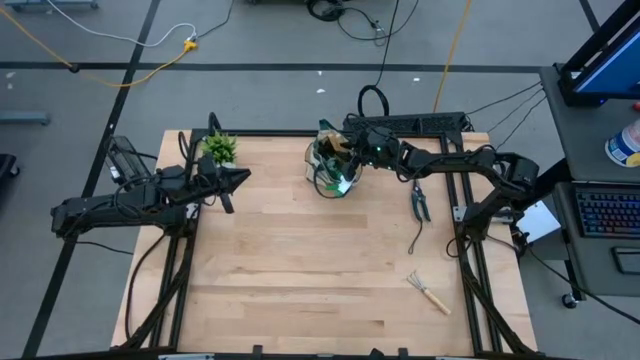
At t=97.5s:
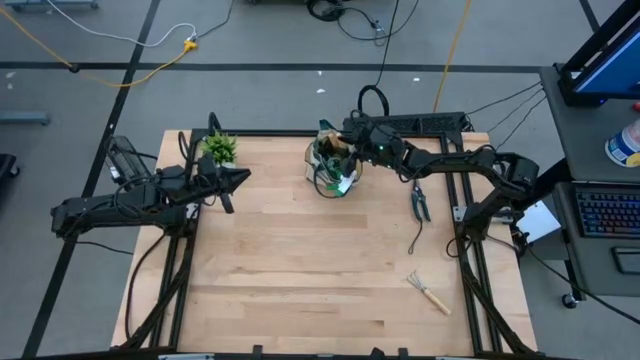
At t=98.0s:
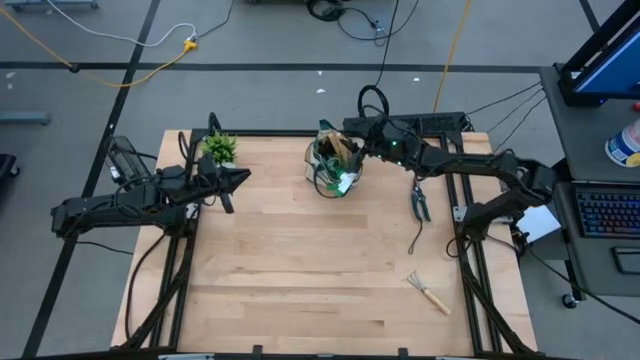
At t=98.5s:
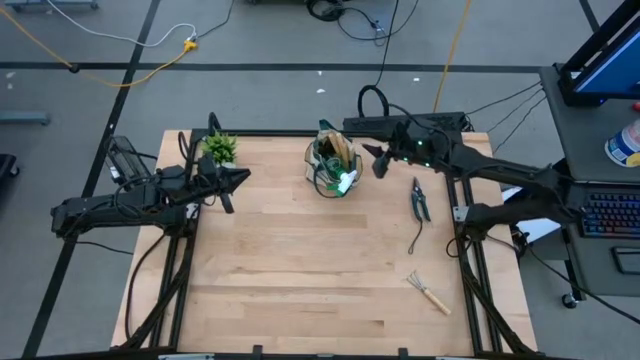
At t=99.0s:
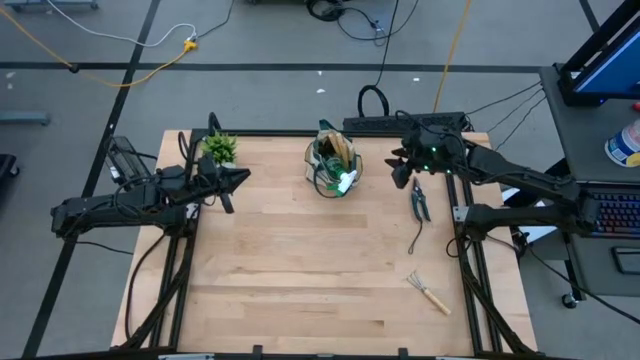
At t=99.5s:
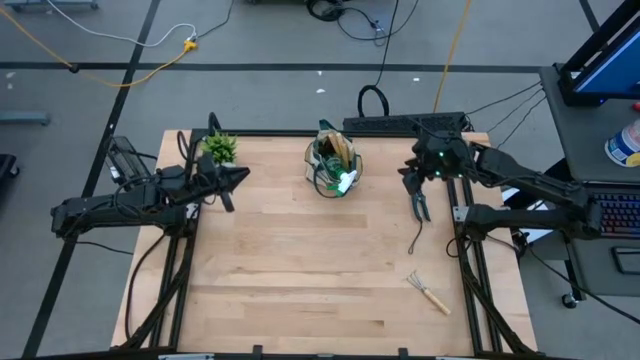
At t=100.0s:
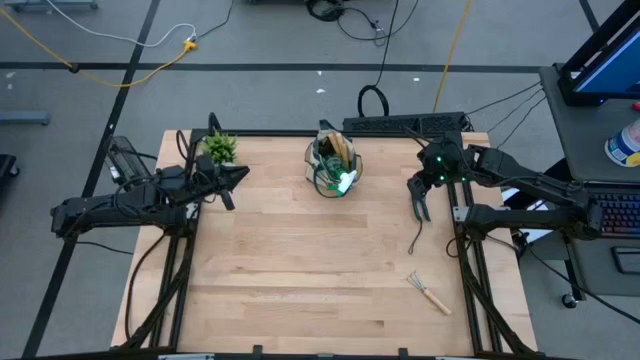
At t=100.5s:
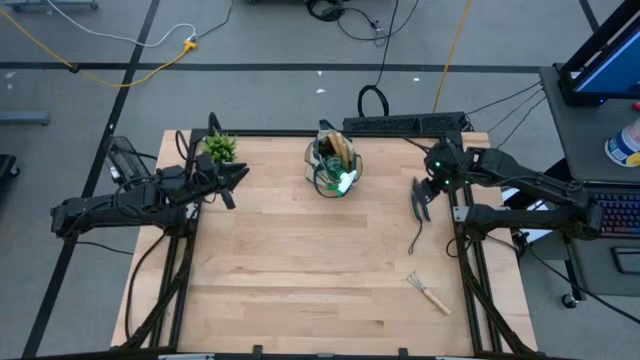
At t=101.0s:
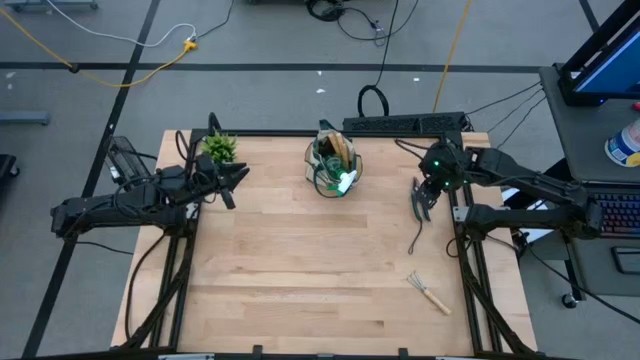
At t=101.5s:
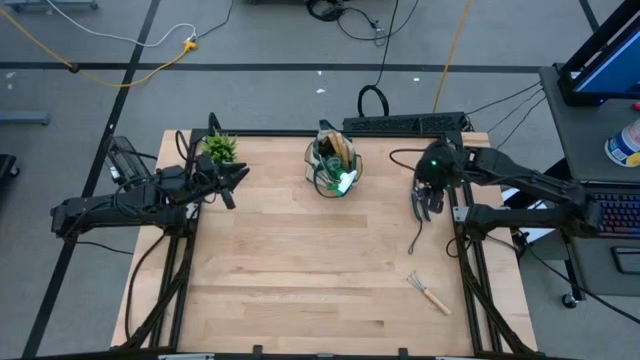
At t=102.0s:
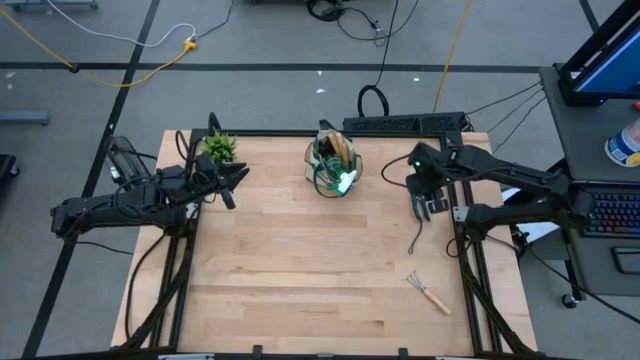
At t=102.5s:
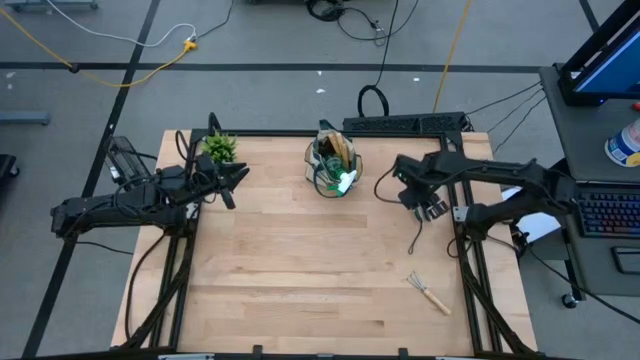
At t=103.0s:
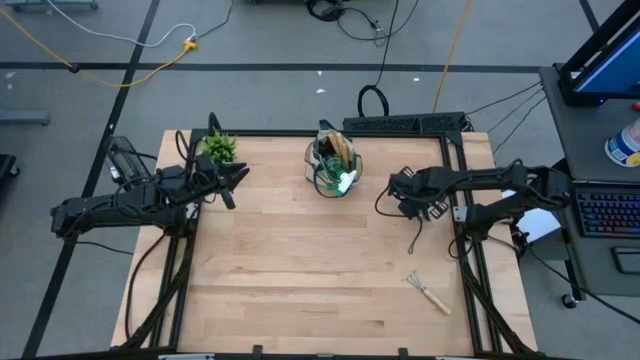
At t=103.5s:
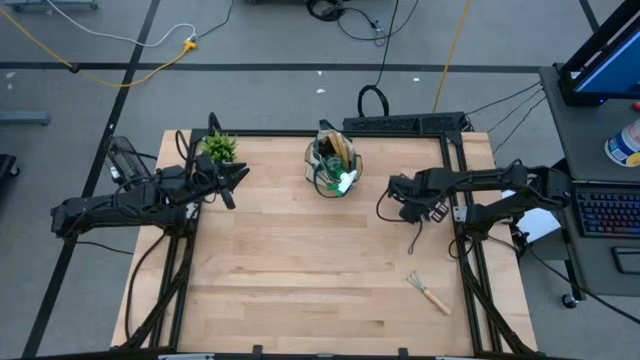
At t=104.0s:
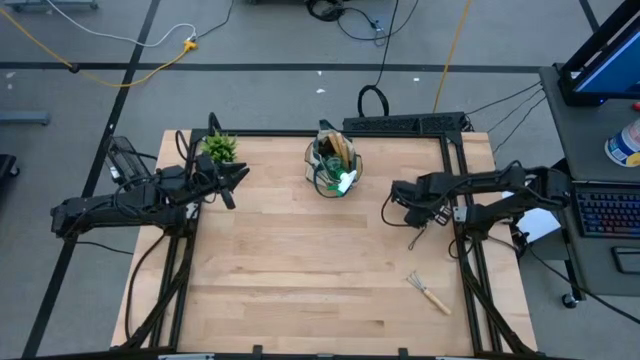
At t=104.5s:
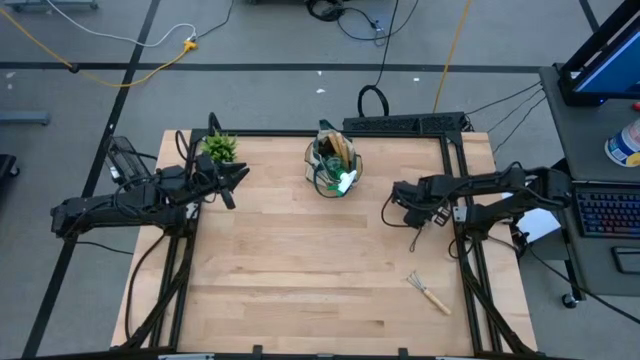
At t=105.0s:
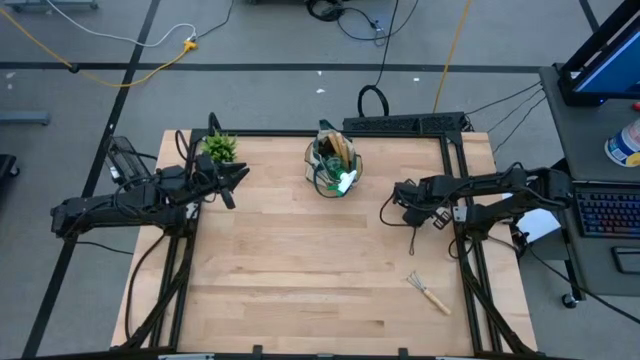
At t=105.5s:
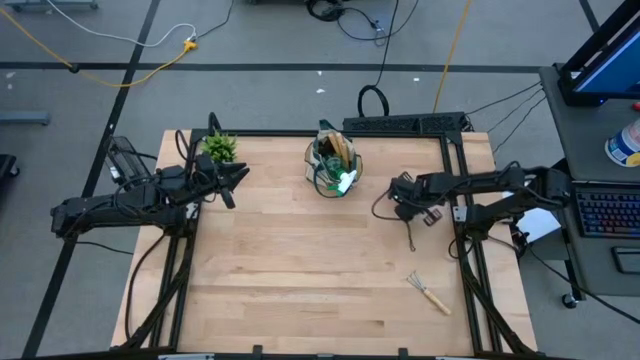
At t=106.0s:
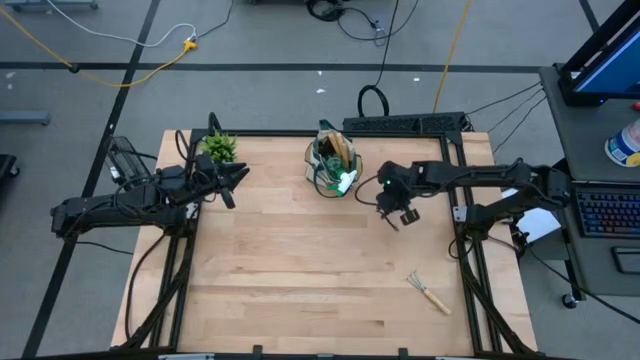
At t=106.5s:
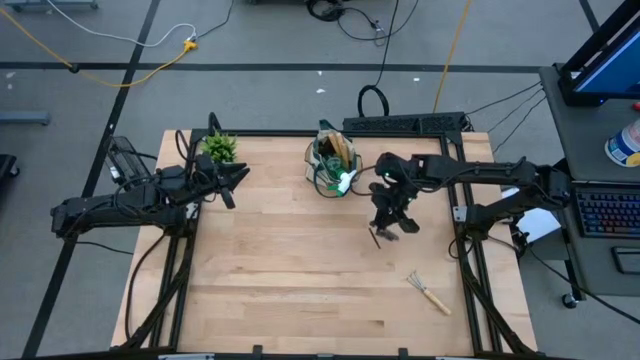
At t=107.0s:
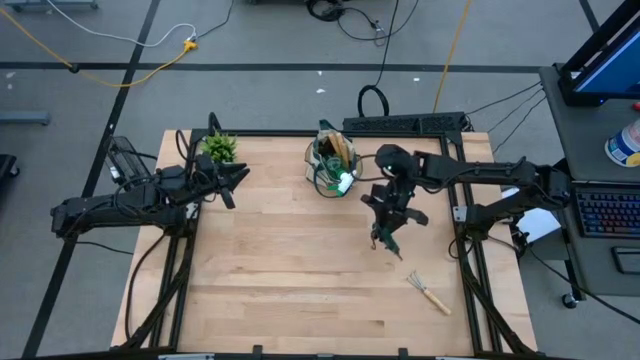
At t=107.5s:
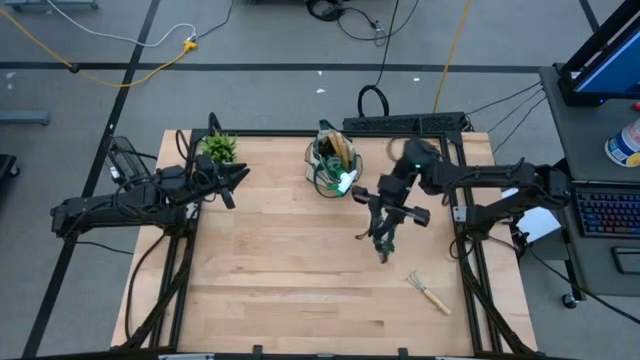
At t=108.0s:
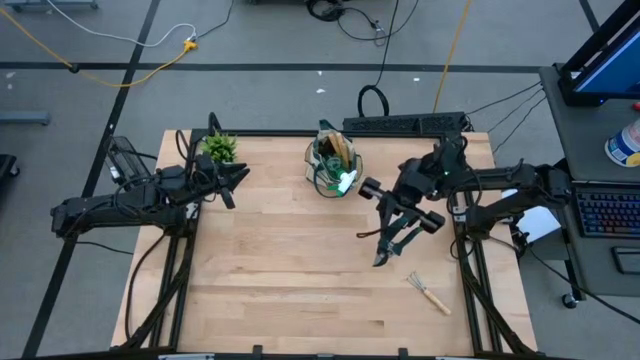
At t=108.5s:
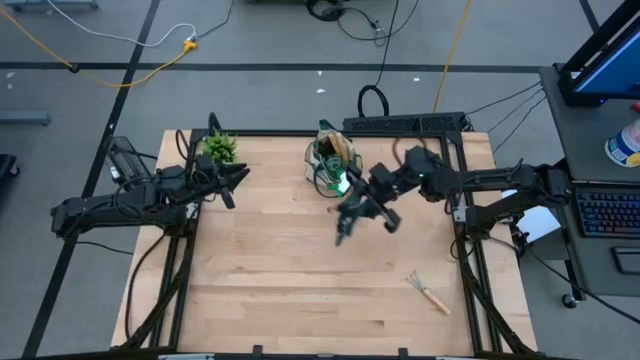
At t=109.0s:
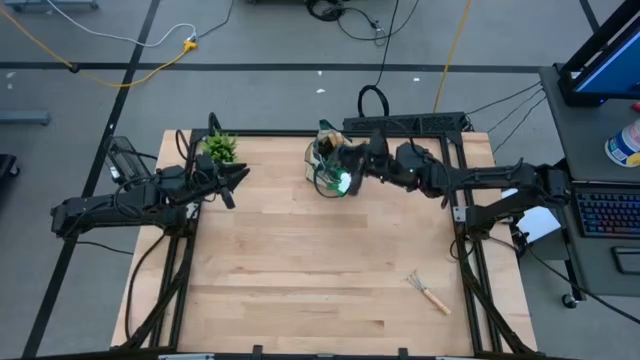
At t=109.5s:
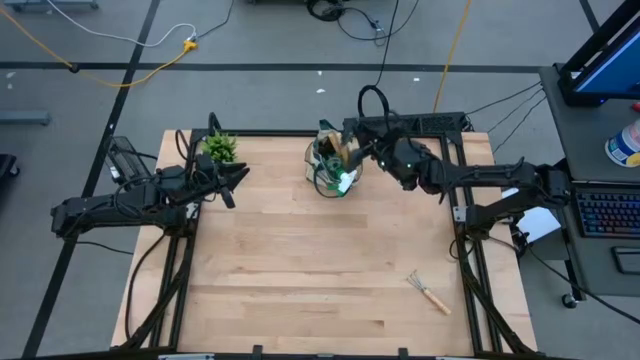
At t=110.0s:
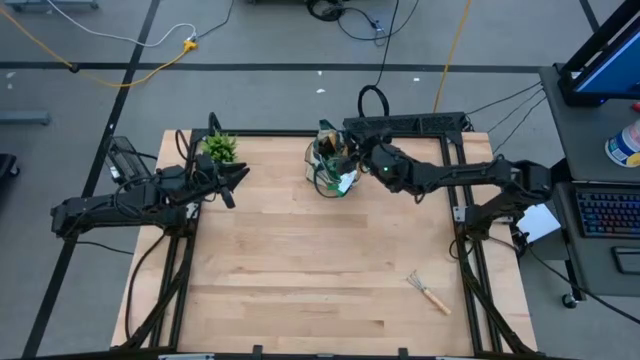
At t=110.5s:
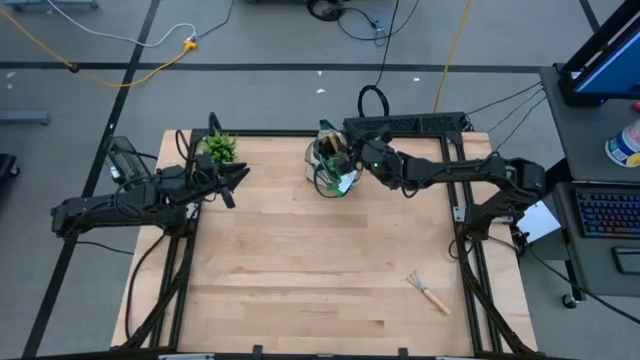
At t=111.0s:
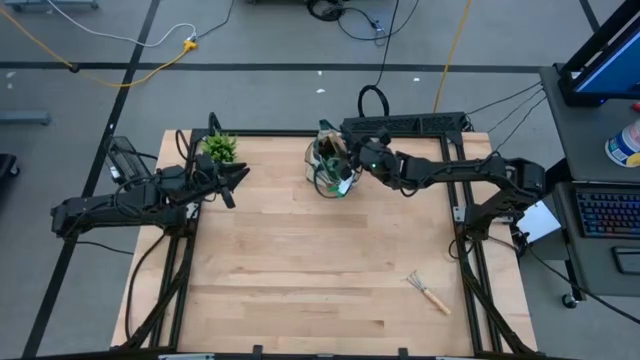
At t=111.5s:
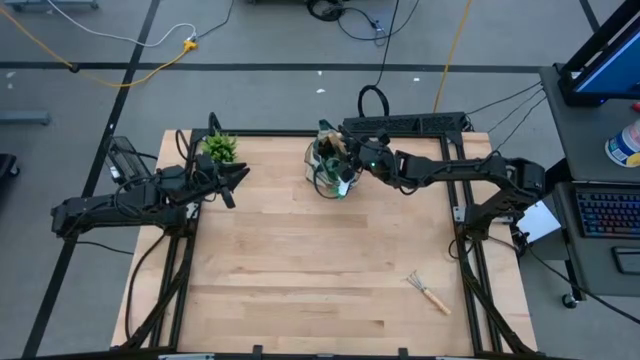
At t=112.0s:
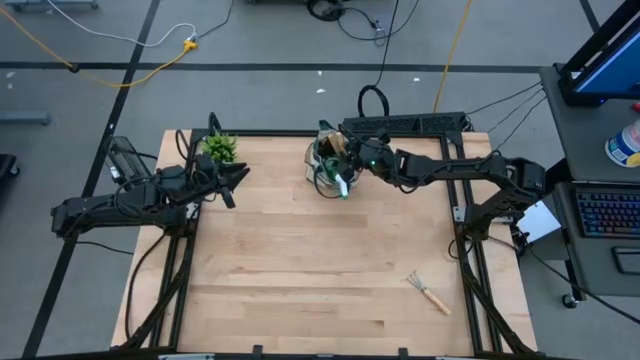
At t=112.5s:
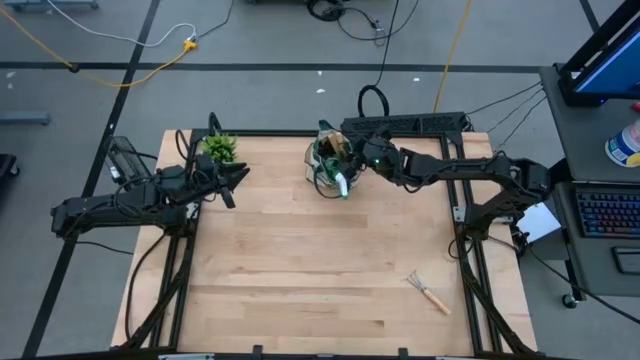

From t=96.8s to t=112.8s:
Task: Pick & Place Garden tools in Gardening bag
Put the green shear scissors into the gardening bag

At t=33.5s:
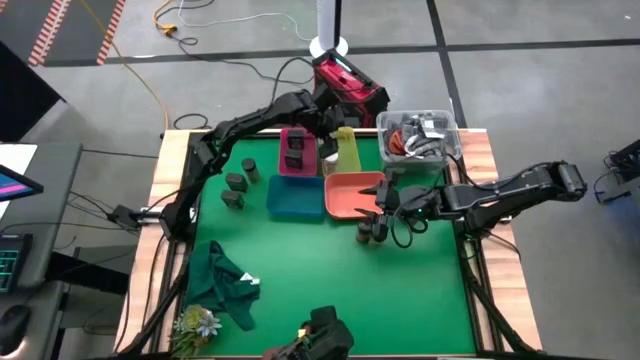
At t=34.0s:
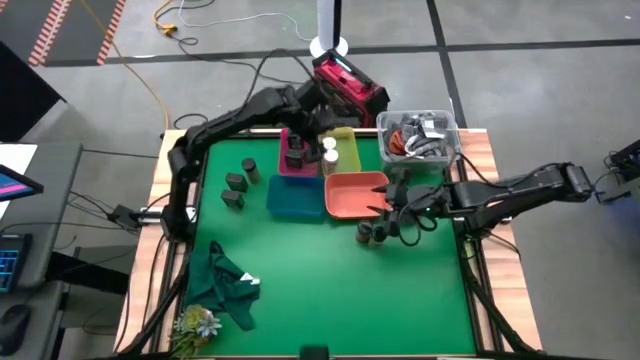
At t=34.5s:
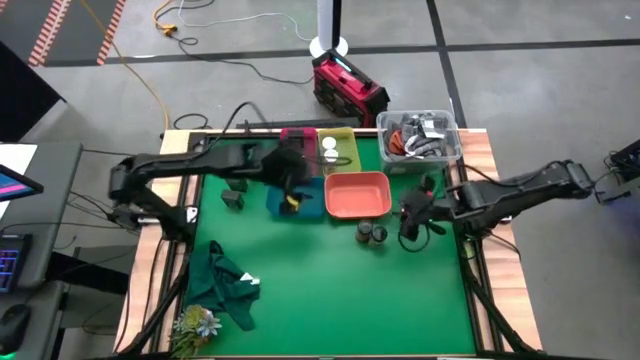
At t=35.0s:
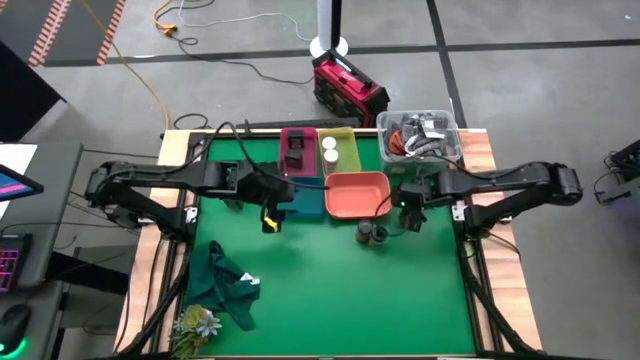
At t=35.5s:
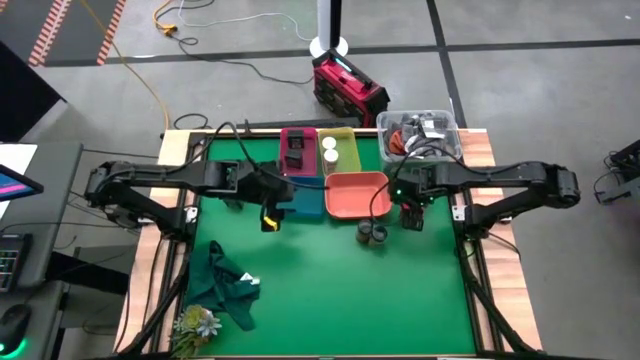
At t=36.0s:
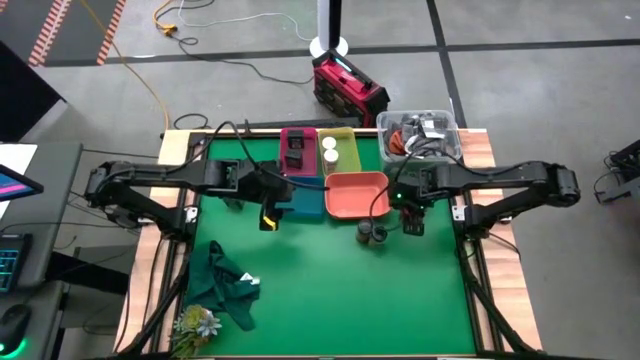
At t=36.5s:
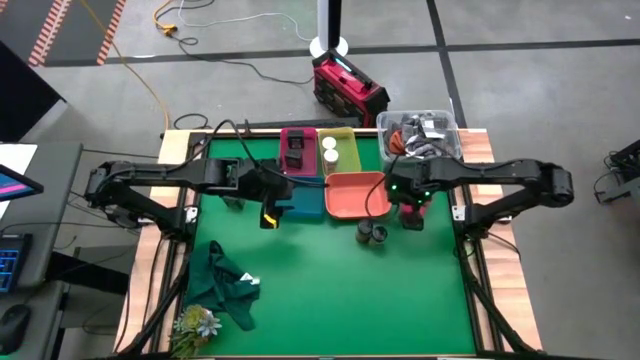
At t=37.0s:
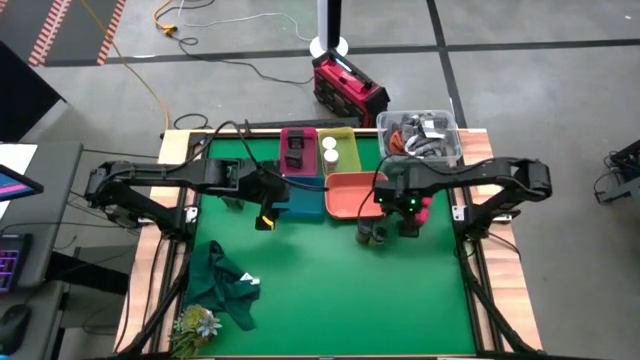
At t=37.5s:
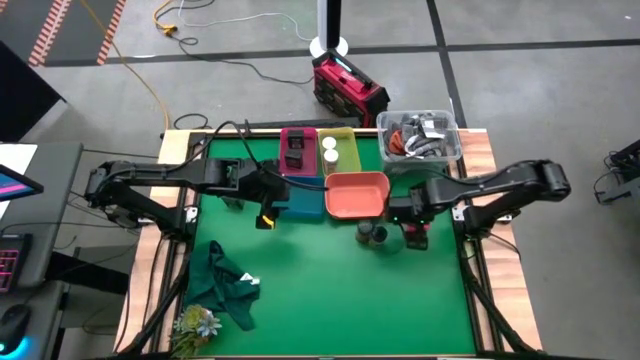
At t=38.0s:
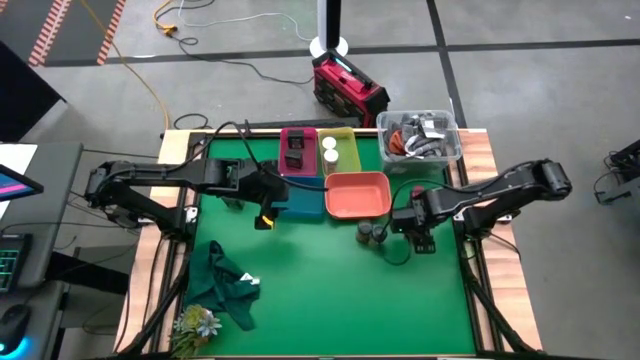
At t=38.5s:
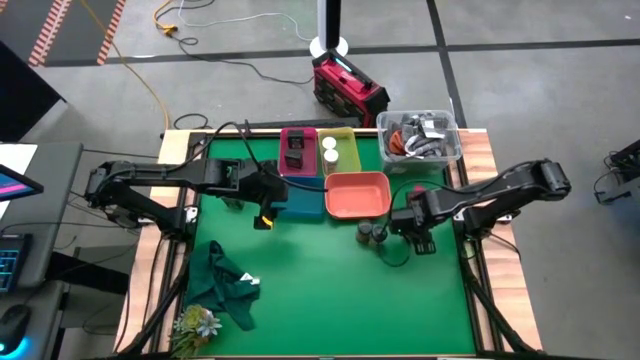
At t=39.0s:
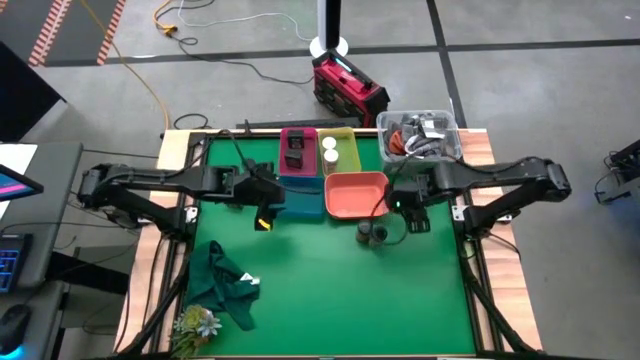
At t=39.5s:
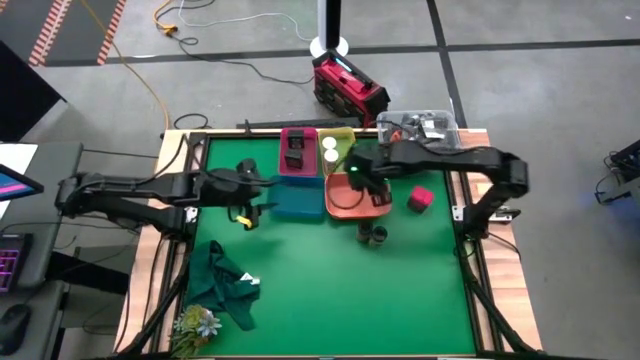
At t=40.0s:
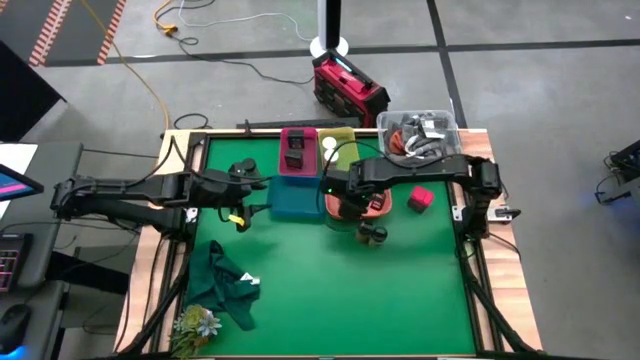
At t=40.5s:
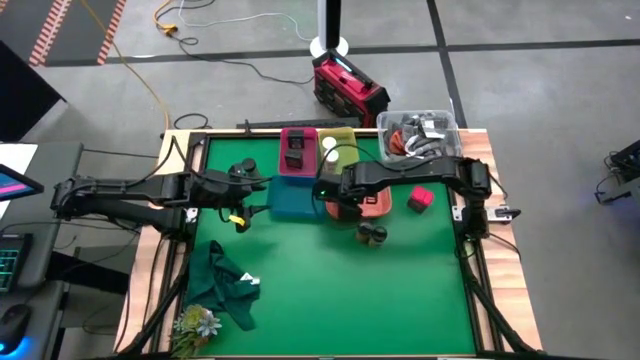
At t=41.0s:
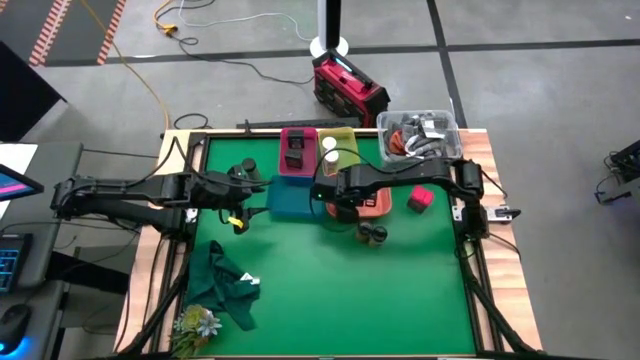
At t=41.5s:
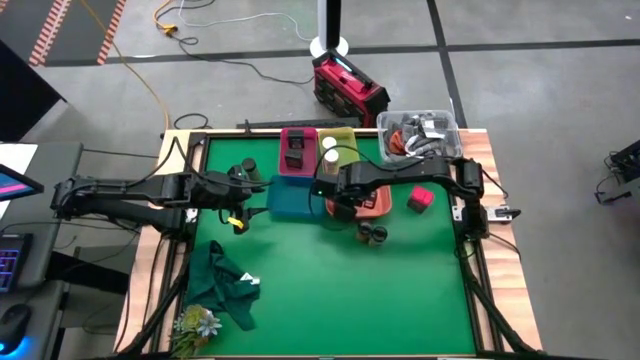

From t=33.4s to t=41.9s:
Task: Sort spices by type
Put the bottom red seasoning can into the orange bin
